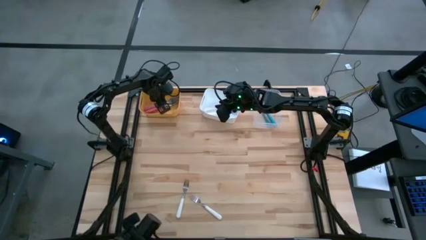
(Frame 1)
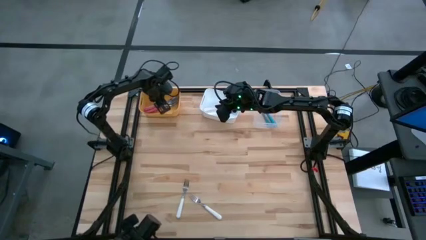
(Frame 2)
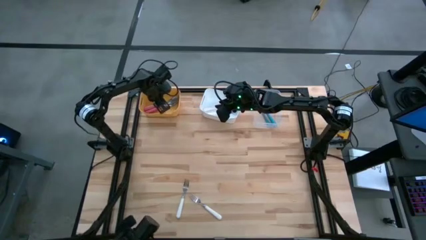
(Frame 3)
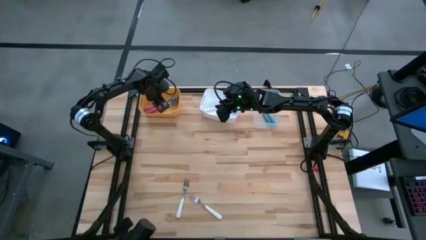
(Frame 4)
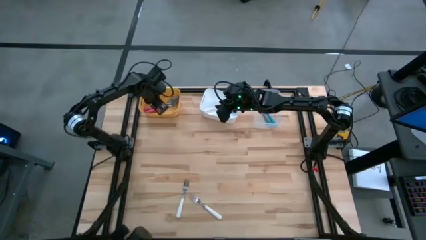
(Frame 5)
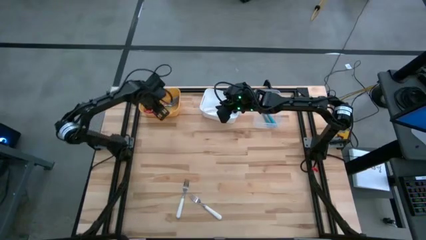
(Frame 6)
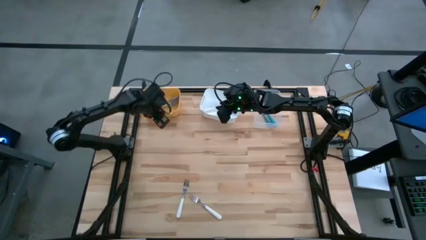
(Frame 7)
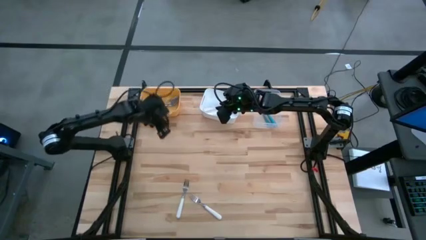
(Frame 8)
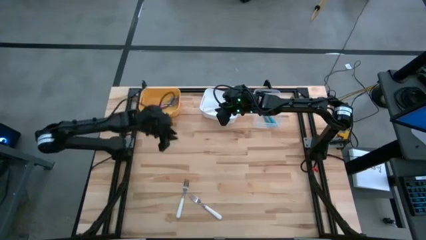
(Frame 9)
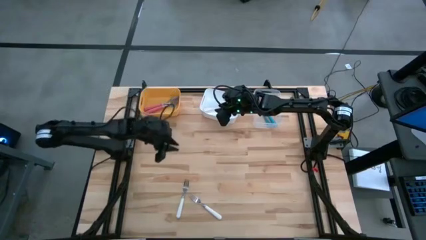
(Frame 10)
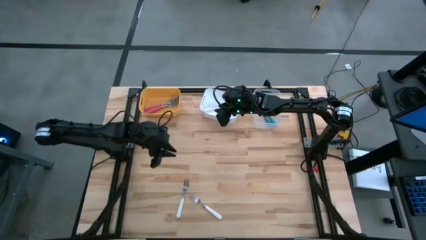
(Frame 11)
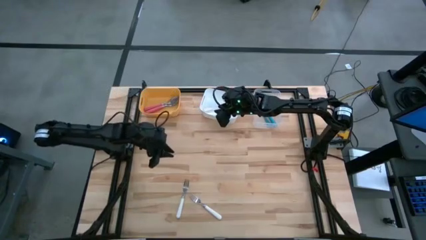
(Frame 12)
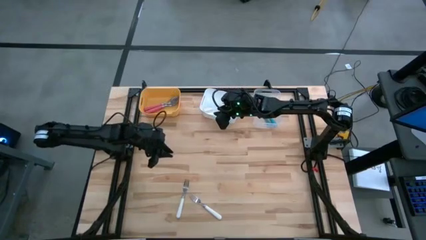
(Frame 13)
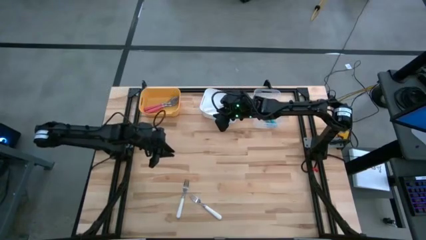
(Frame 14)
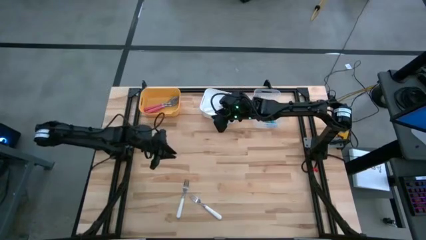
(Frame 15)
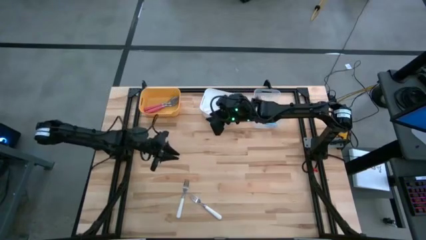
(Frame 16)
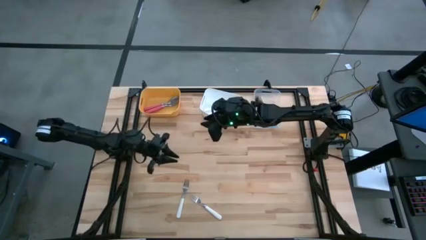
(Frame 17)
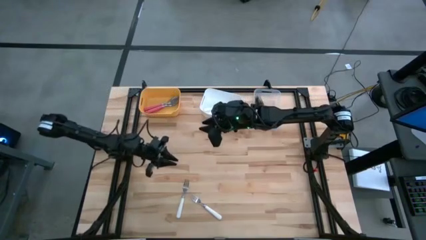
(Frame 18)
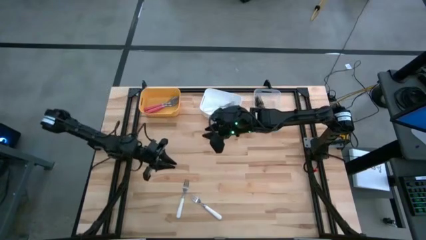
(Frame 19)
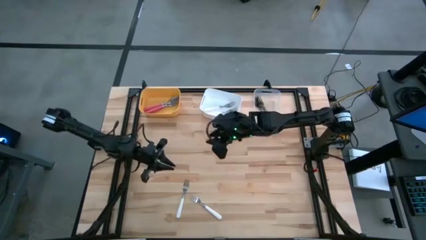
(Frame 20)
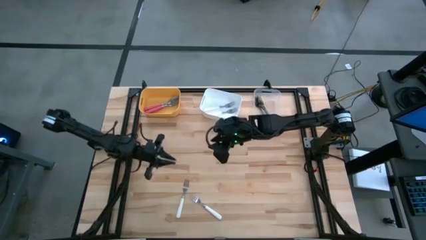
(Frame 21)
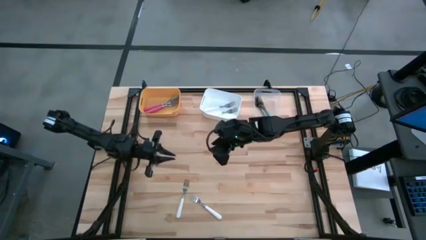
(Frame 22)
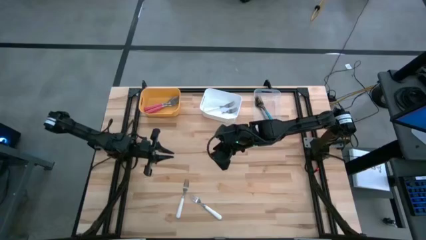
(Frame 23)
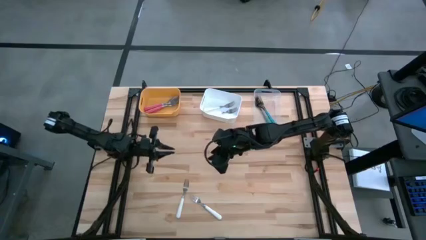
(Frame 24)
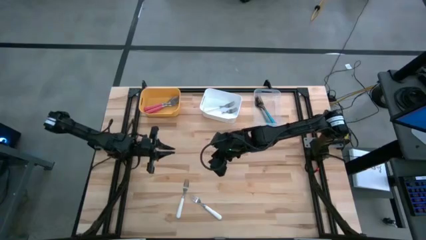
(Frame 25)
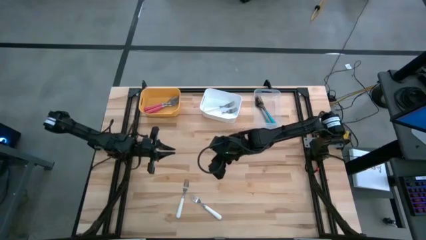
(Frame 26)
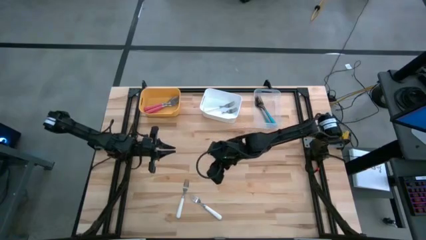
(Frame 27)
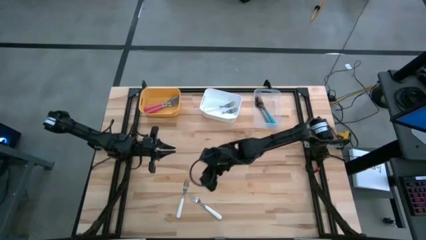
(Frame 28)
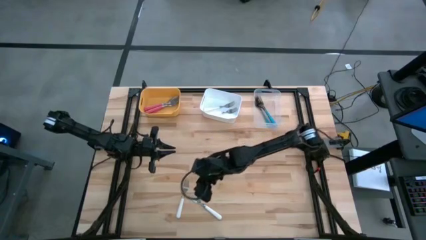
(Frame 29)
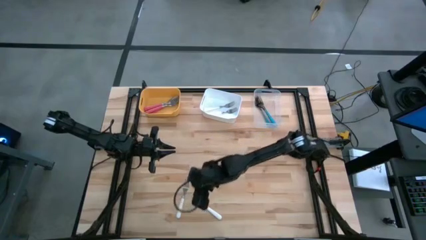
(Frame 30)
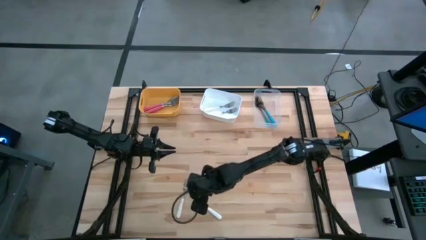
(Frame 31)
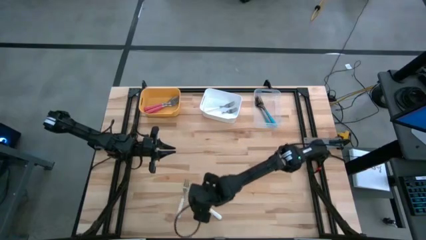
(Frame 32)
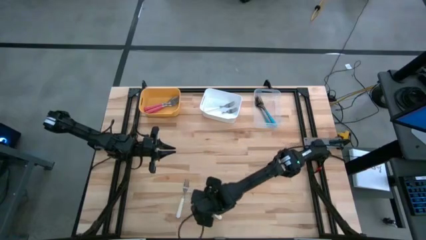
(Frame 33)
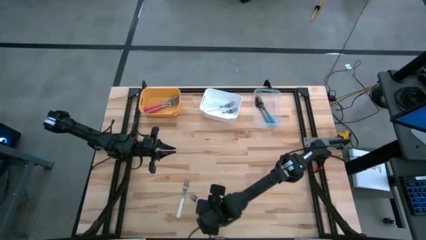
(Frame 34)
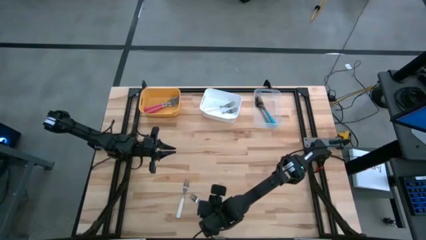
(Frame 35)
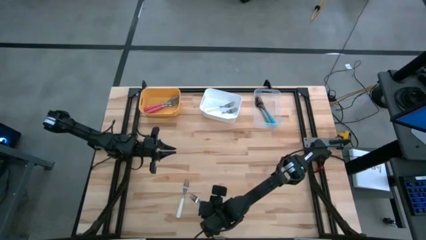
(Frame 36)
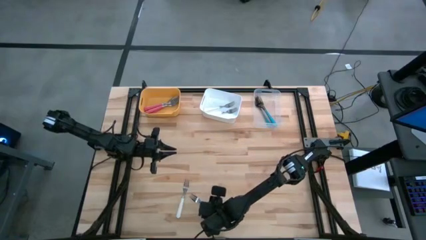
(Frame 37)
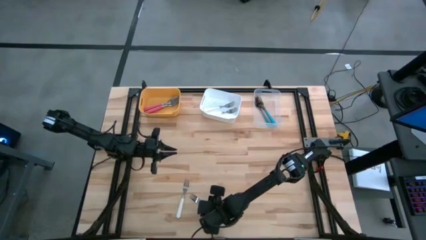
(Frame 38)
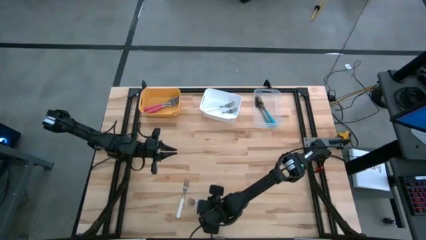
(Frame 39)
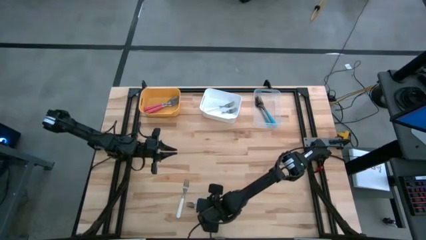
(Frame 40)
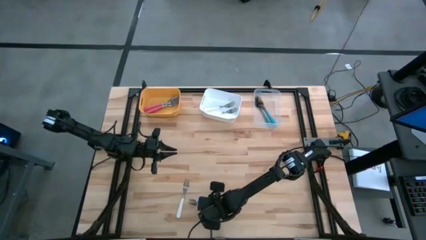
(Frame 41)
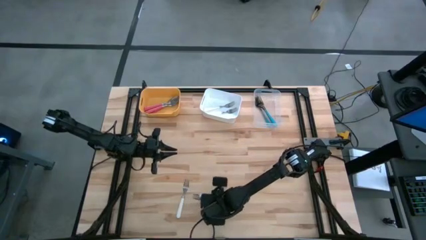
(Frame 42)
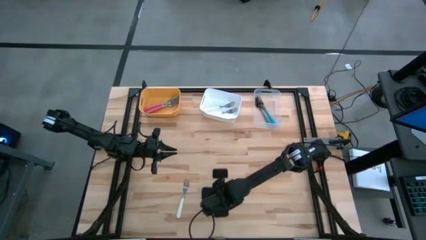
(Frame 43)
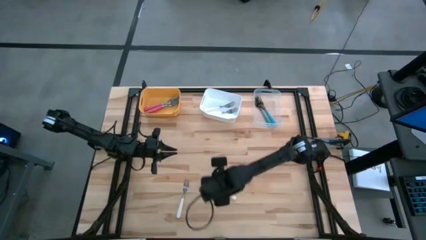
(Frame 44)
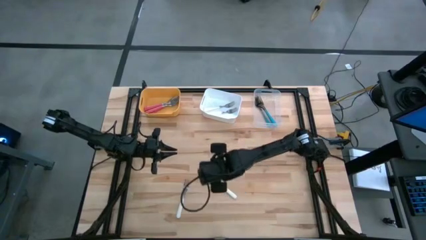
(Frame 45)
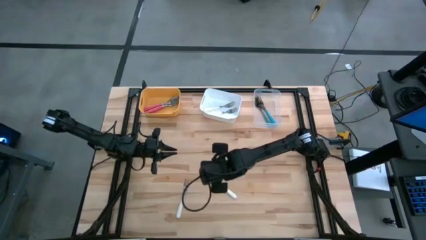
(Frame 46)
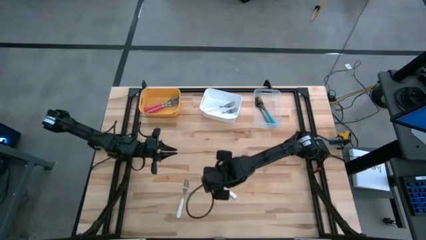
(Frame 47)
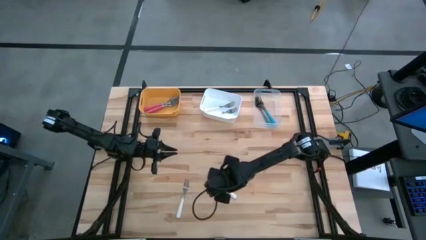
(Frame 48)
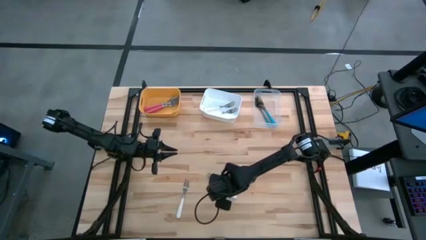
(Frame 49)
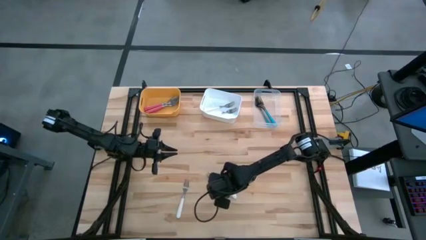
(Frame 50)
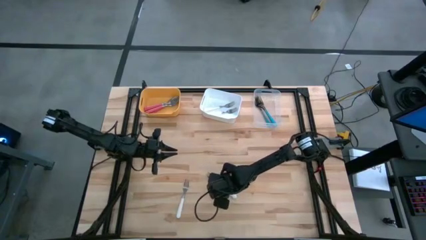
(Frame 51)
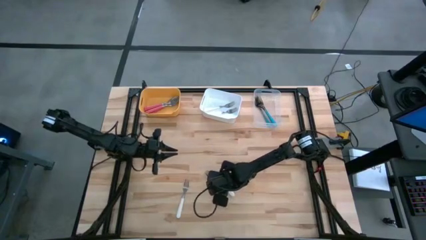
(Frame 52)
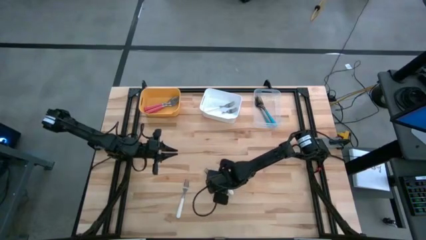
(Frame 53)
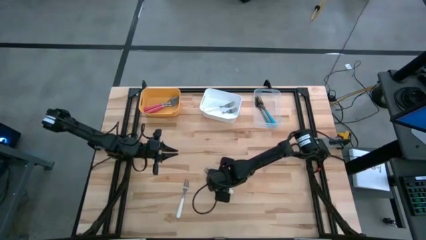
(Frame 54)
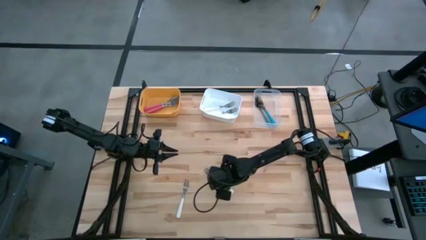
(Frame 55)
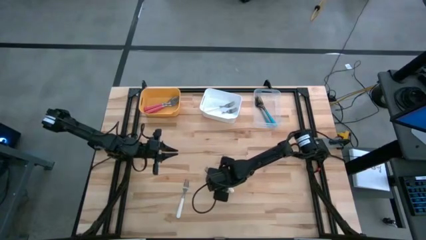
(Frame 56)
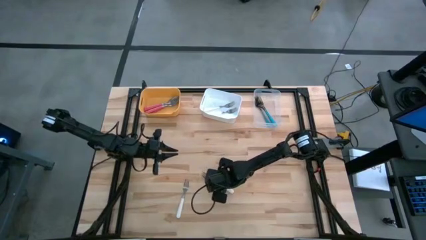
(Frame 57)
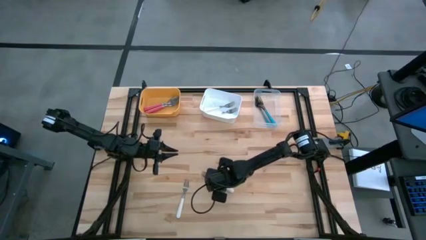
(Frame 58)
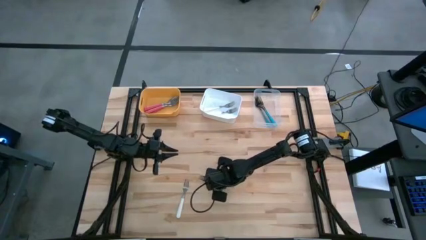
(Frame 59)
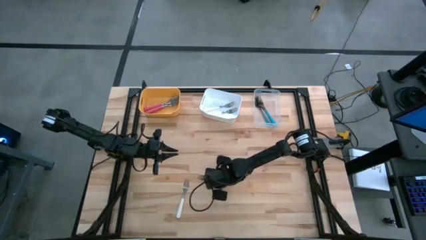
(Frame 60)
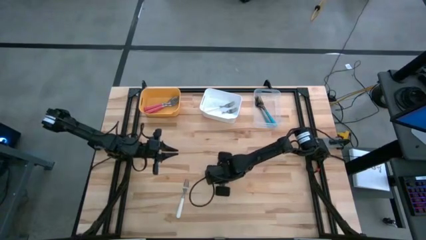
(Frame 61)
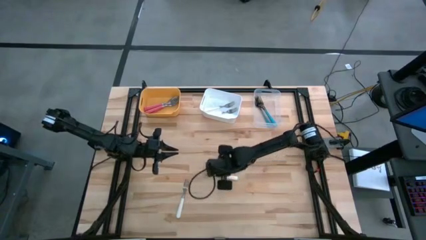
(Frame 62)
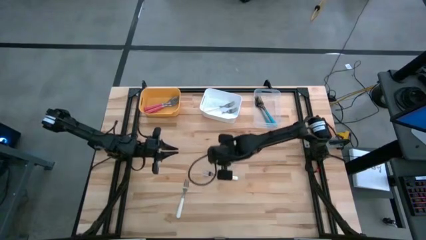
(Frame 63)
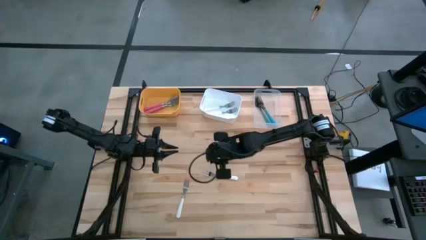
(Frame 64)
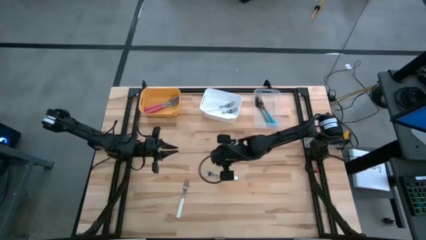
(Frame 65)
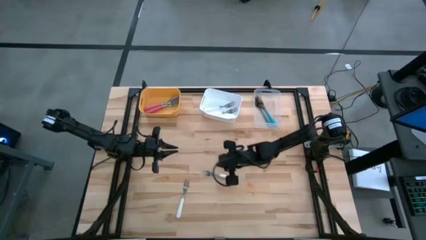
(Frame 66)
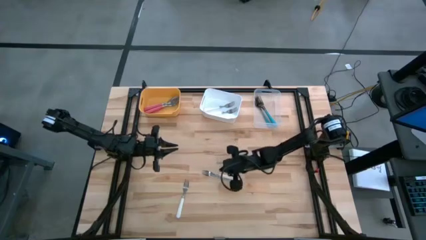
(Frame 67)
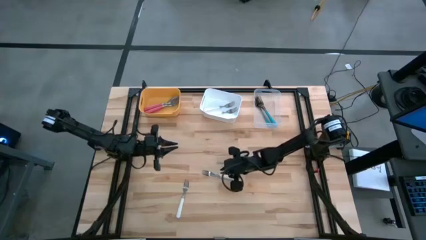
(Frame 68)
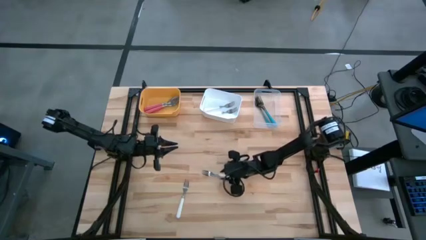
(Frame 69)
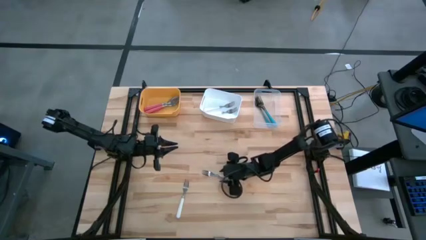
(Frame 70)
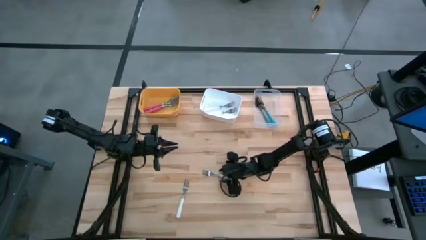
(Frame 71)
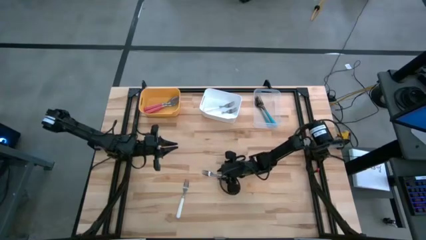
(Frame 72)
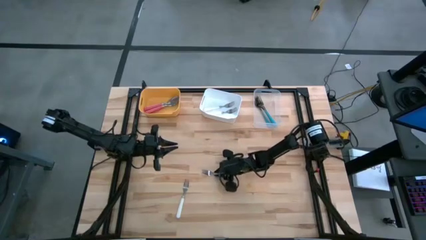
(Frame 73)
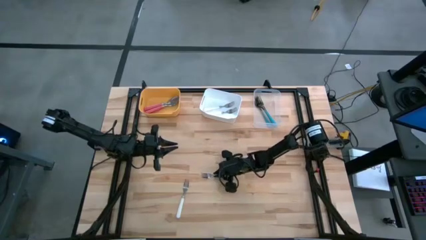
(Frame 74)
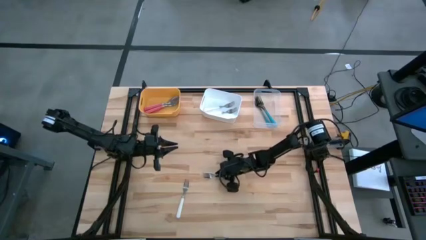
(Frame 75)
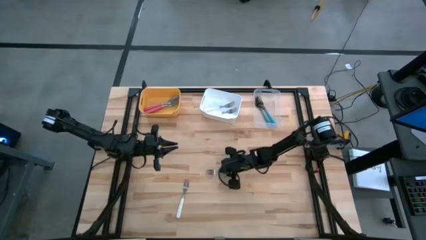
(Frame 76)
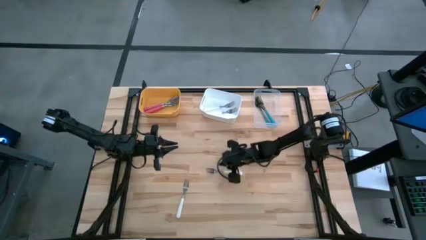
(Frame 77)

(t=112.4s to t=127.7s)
Task: Sort silverware by color (type)
Put the white fork into the white bin
